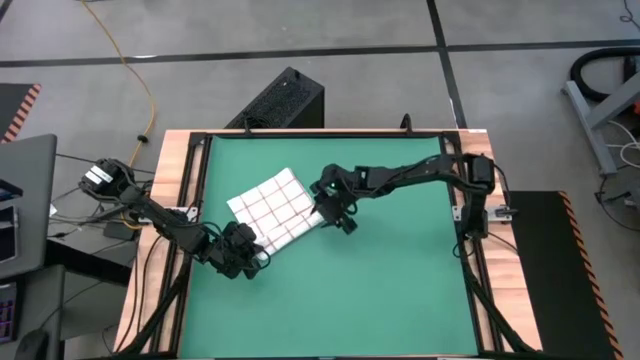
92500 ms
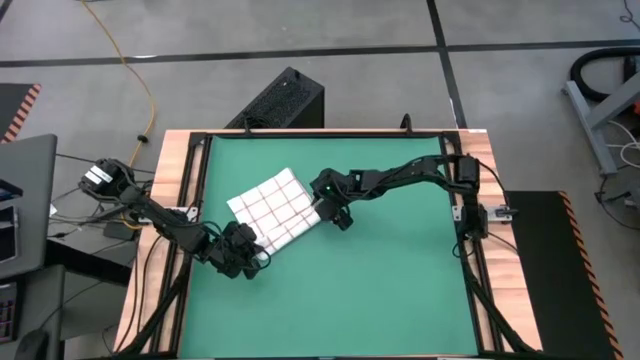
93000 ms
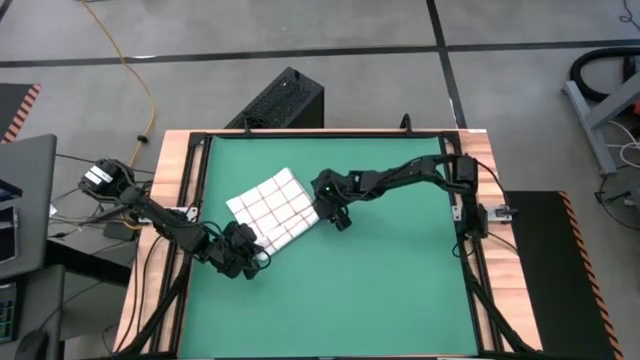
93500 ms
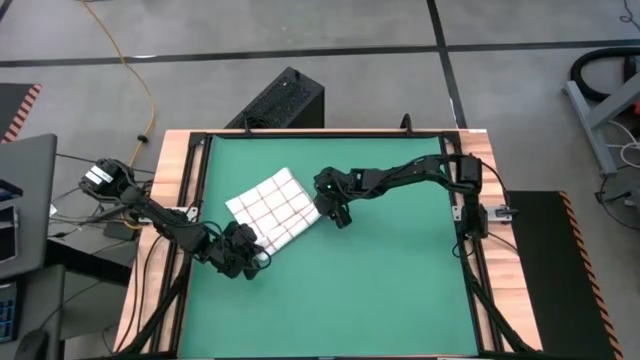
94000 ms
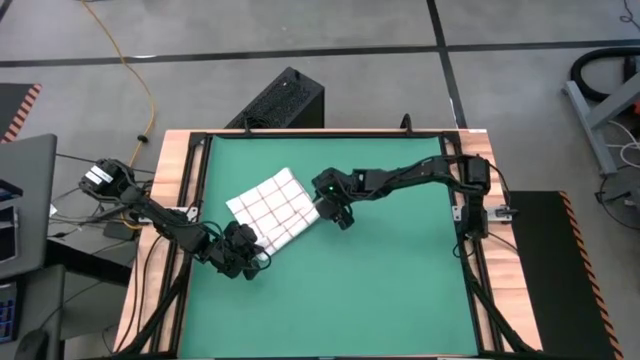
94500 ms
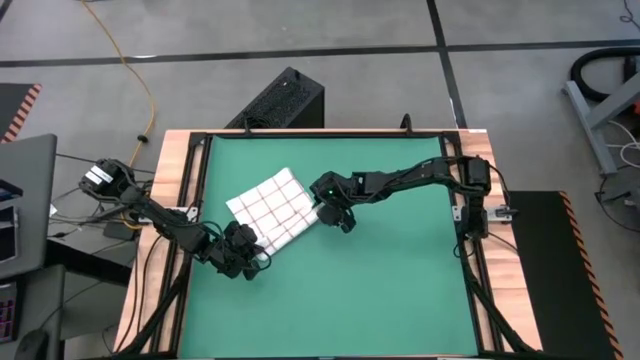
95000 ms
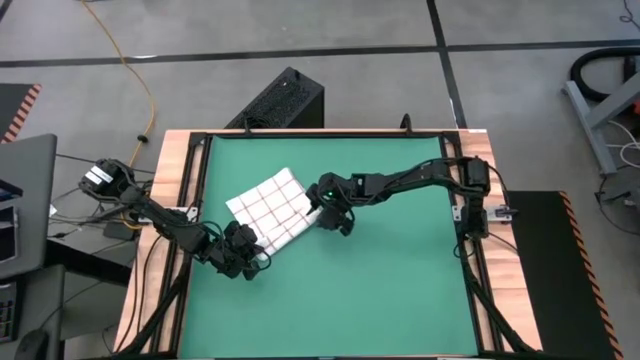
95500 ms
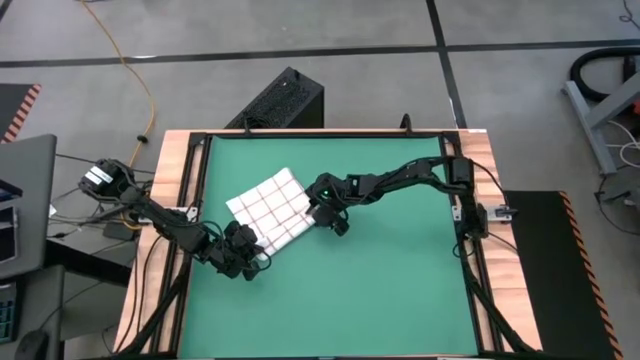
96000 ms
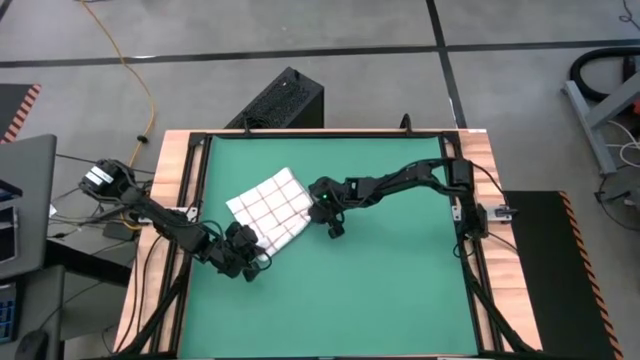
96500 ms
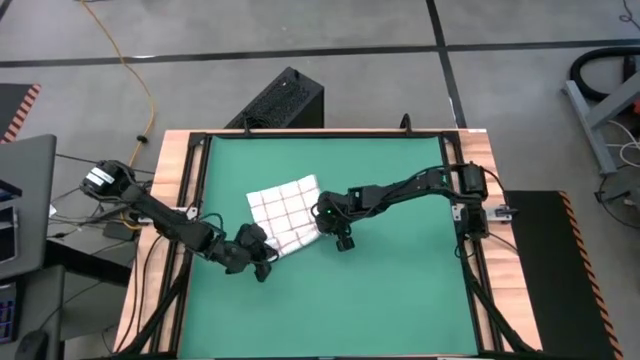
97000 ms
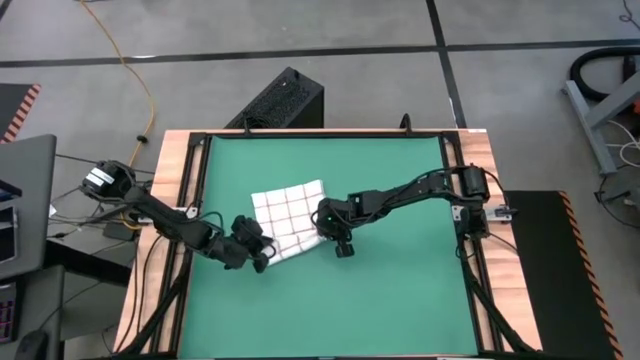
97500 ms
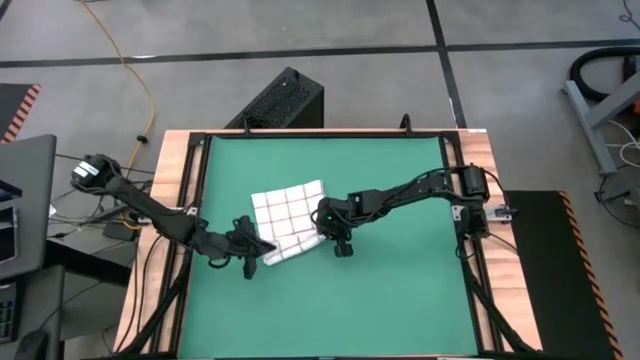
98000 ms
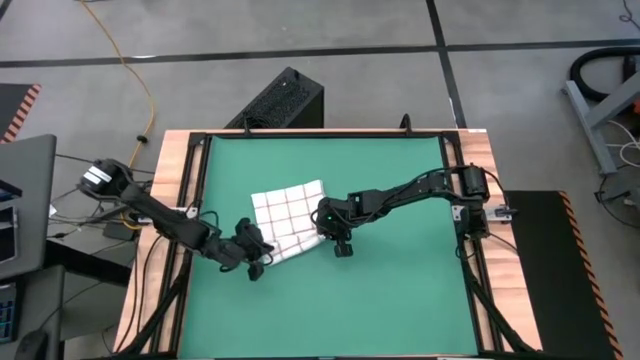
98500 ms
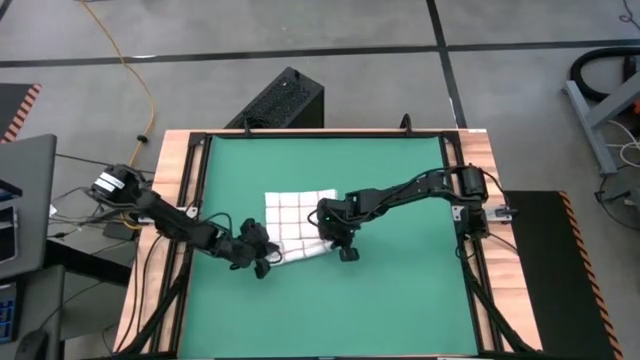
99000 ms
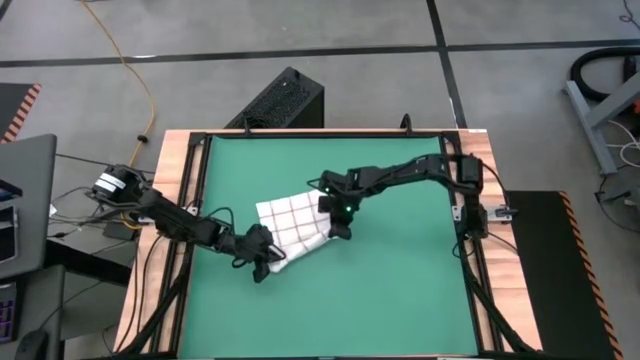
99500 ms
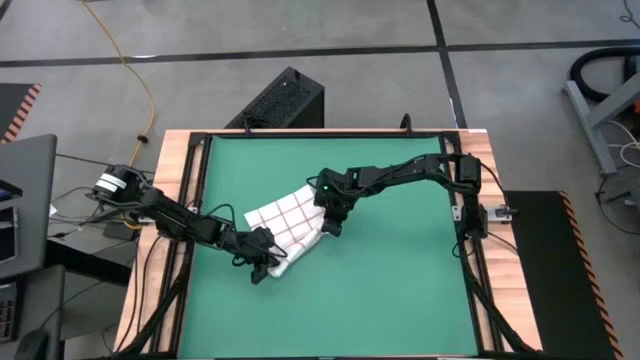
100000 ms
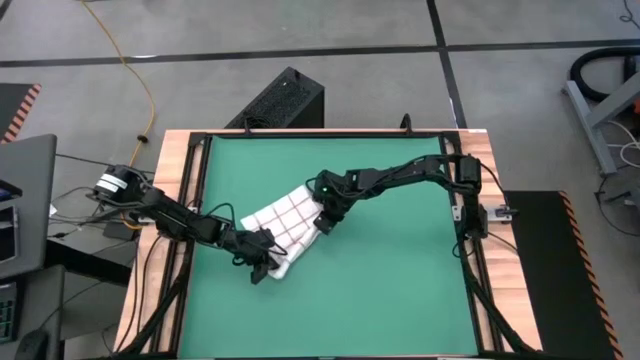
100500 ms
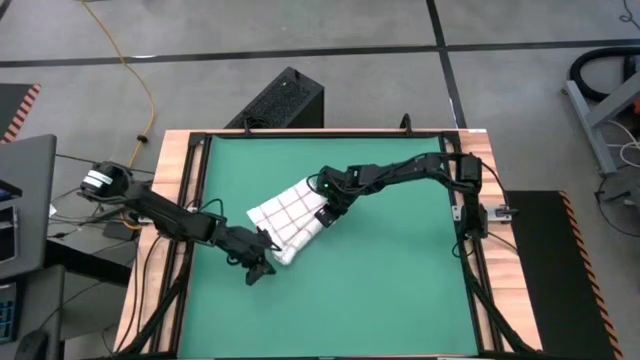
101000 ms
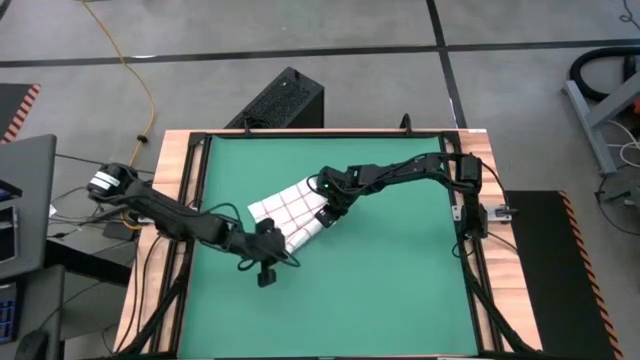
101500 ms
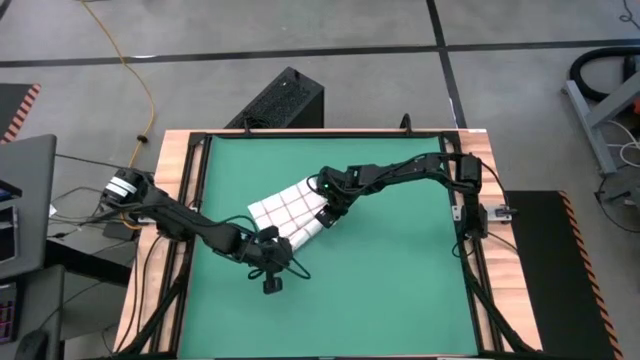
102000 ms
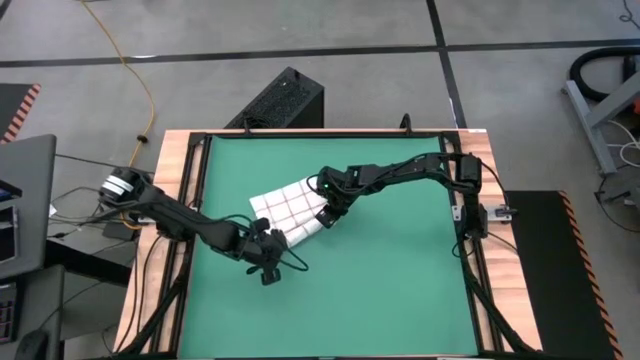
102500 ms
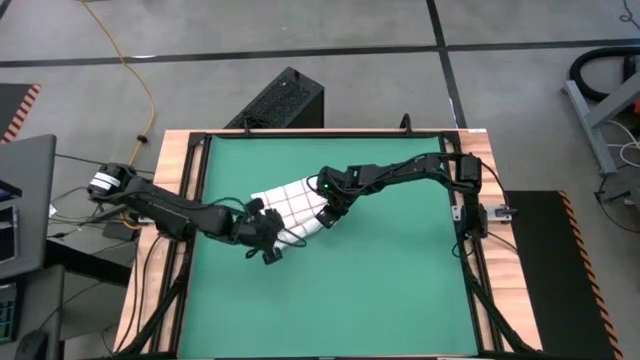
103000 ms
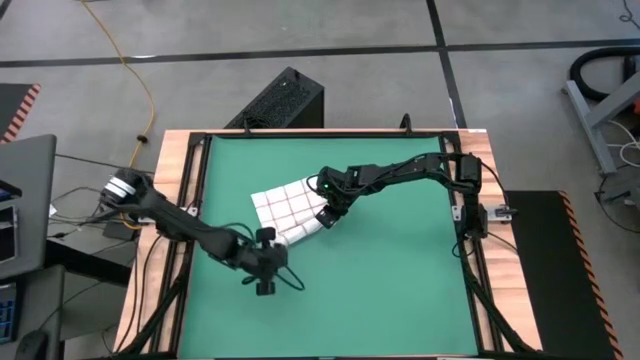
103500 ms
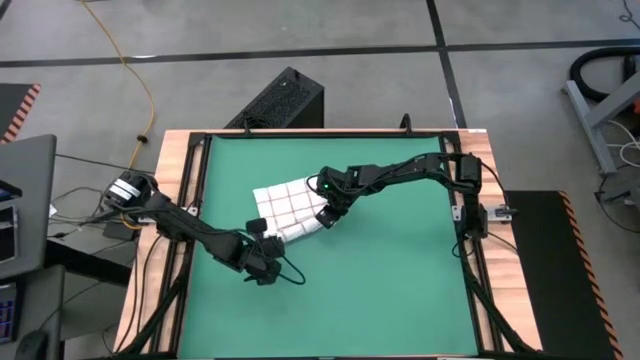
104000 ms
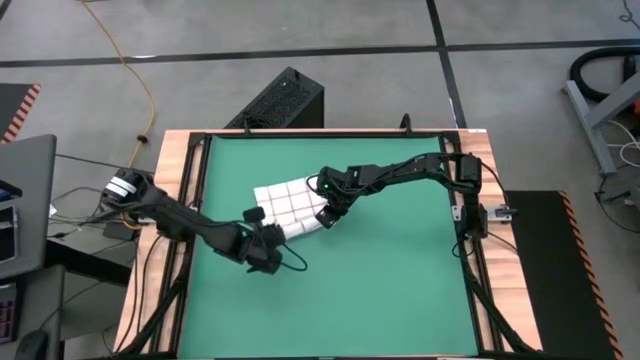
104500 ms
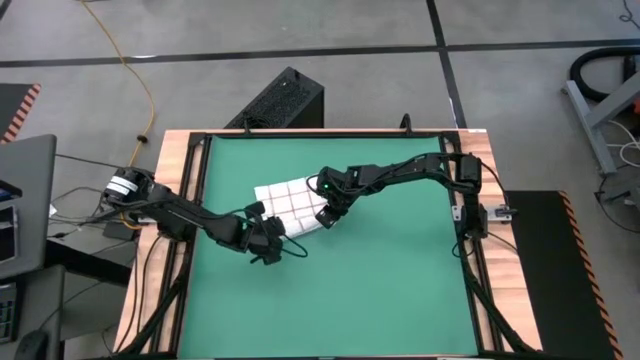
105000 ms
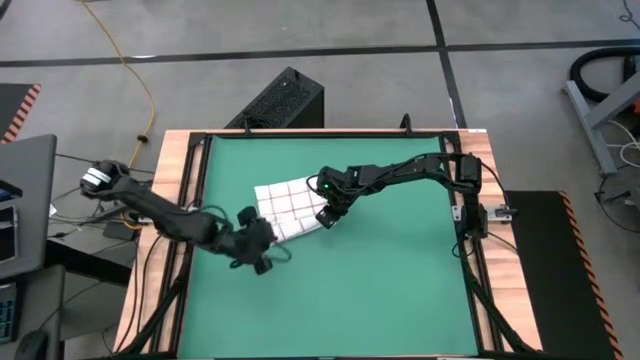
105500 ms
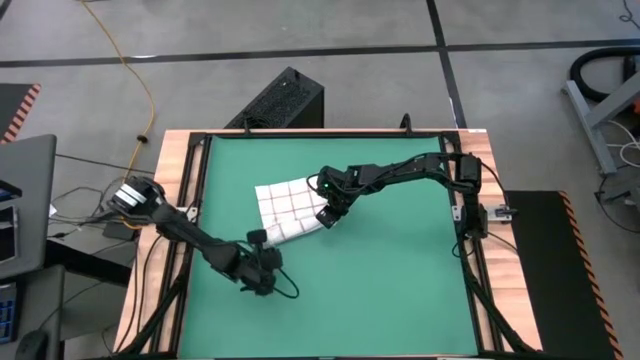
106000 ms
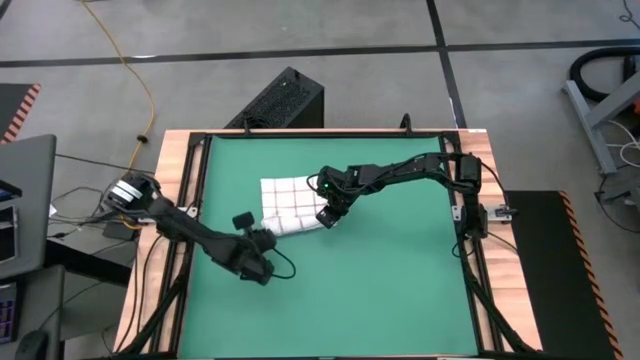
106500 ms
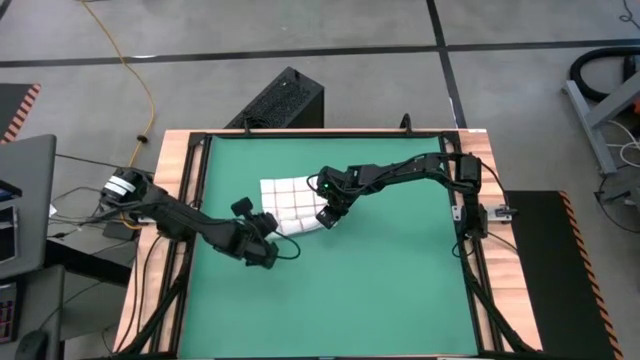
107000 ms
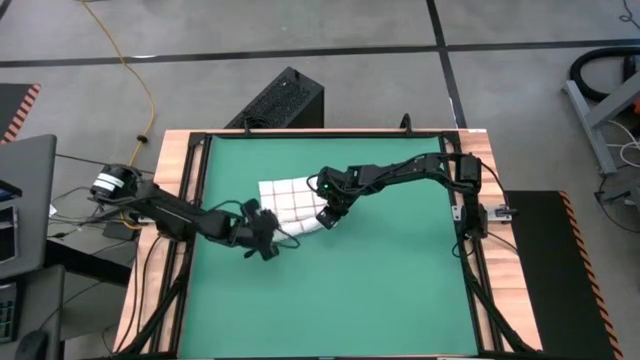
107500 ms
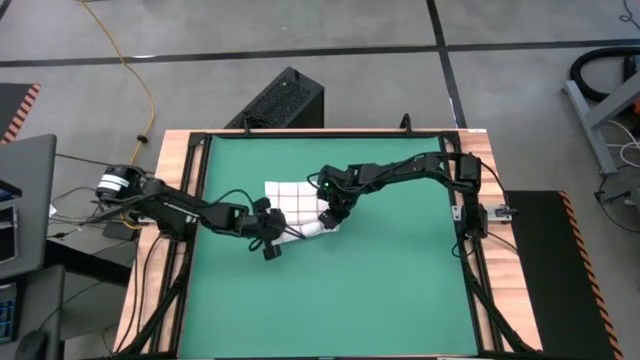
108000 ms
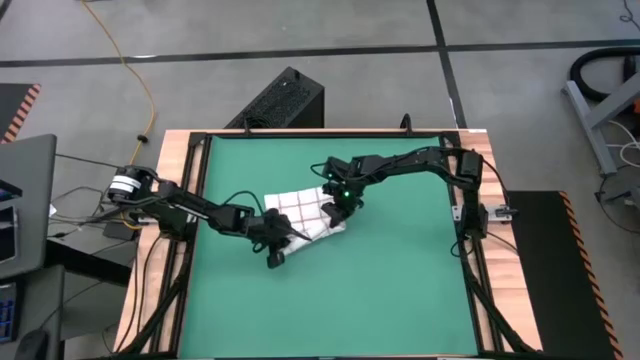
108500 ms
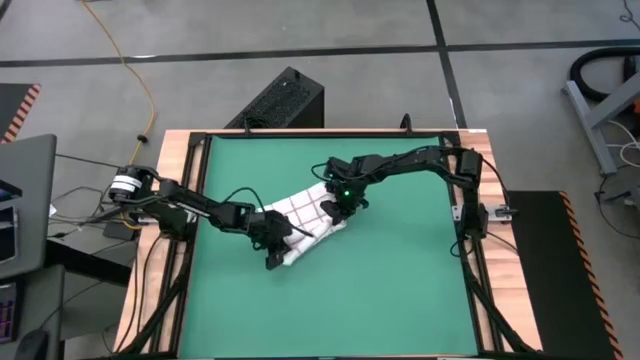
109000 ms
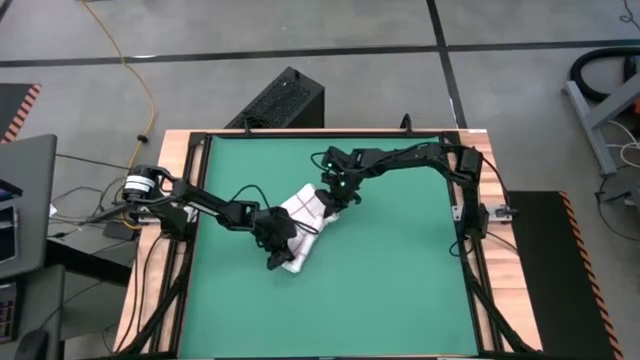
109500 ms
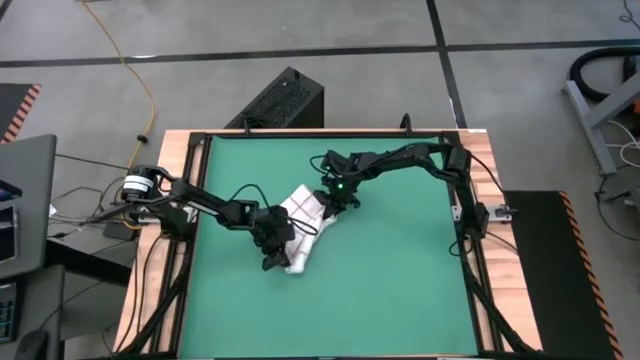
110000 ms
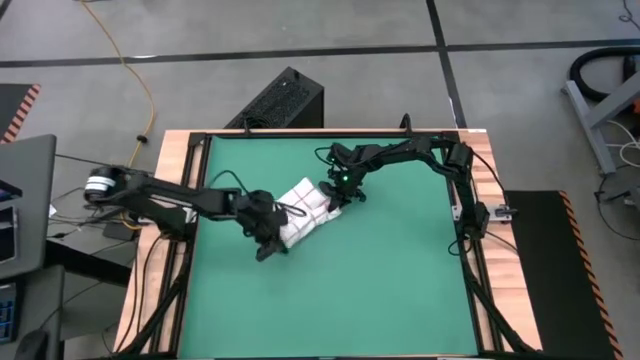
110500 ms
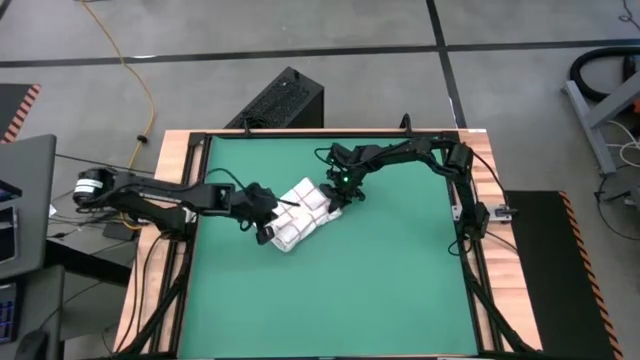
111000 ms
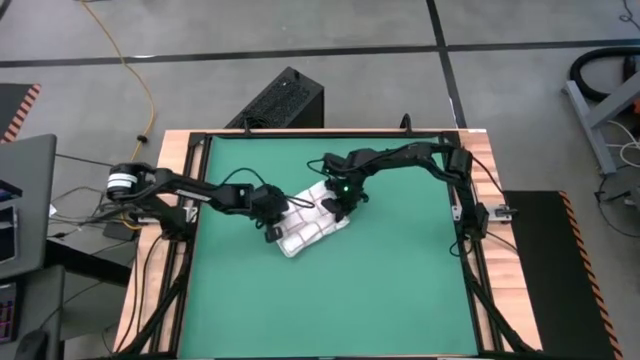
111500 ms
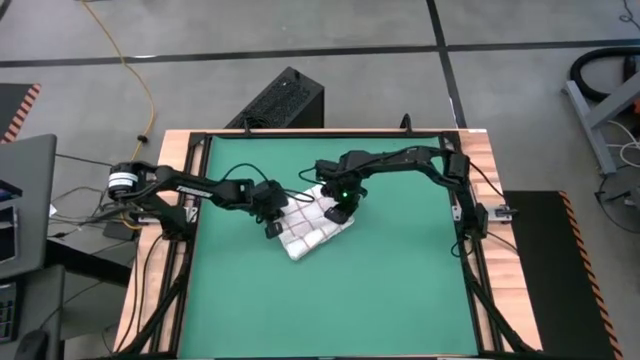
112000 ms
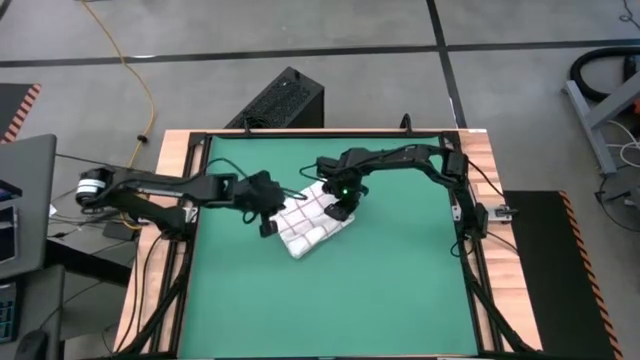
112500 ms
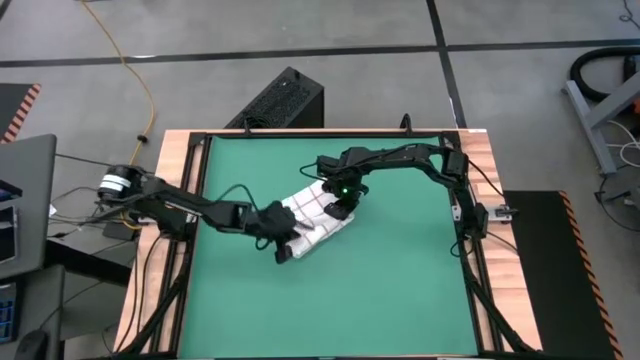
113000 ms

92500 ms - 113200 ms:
Task: Roll towel
Roll the white towel
